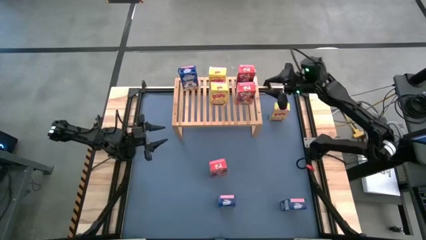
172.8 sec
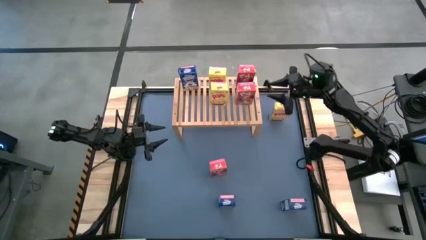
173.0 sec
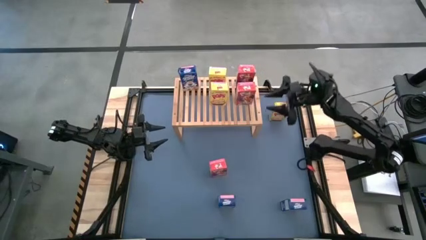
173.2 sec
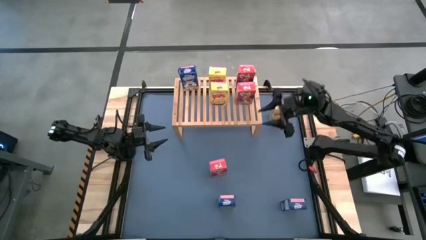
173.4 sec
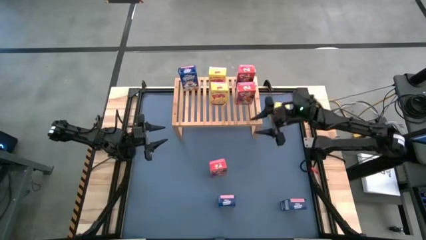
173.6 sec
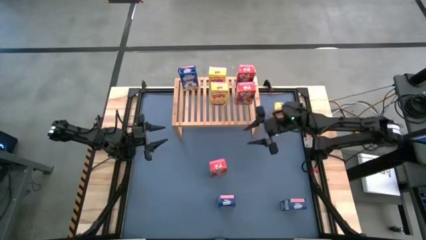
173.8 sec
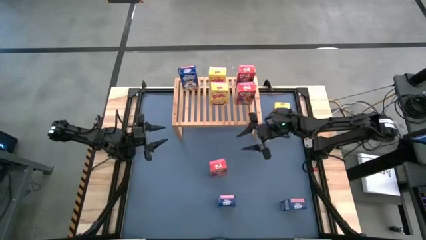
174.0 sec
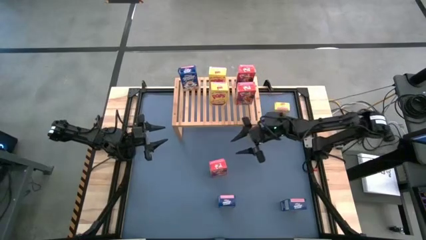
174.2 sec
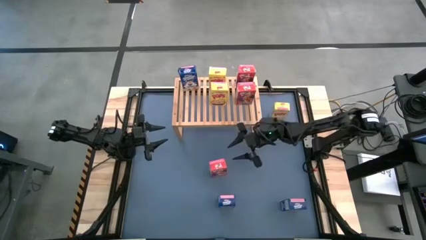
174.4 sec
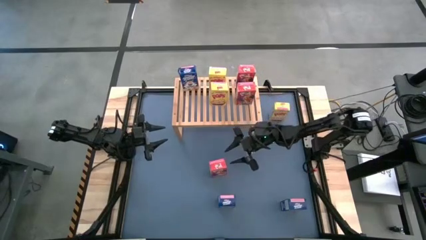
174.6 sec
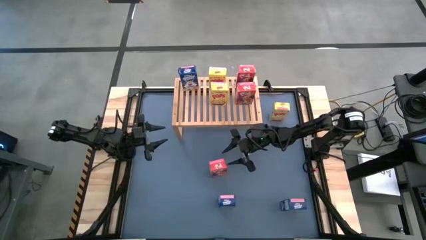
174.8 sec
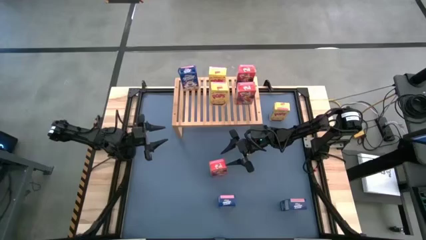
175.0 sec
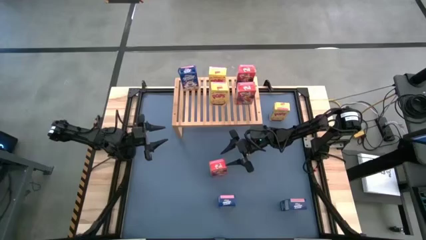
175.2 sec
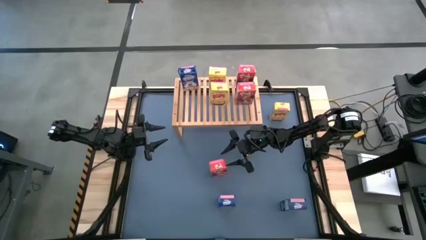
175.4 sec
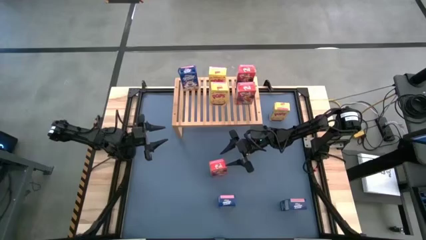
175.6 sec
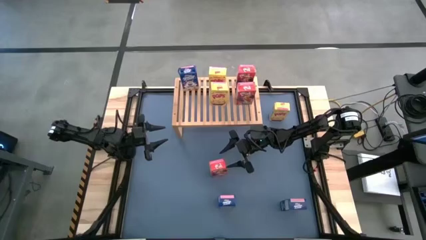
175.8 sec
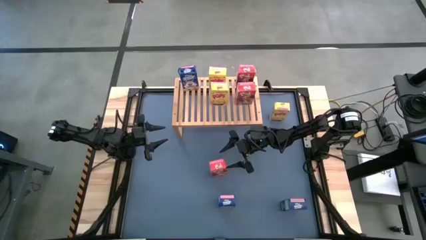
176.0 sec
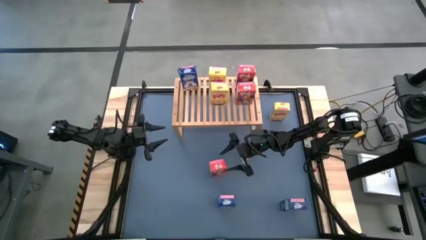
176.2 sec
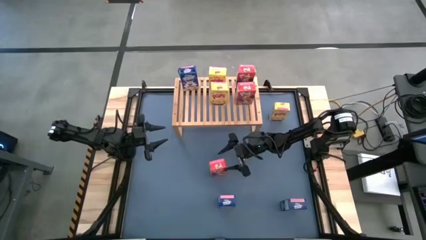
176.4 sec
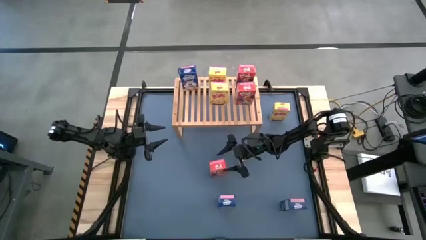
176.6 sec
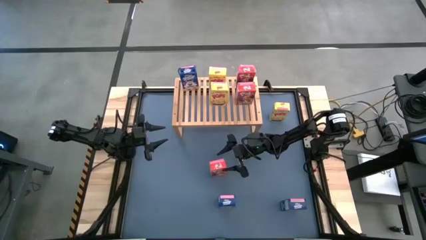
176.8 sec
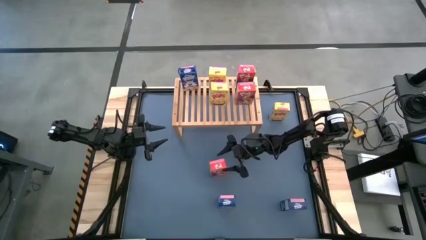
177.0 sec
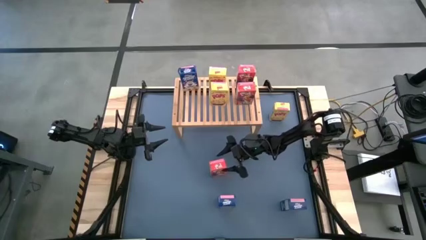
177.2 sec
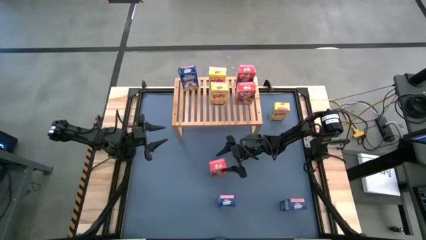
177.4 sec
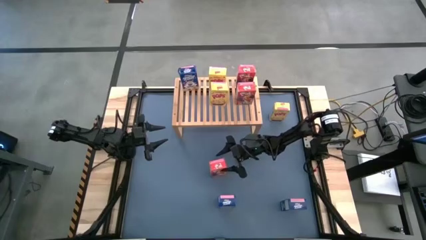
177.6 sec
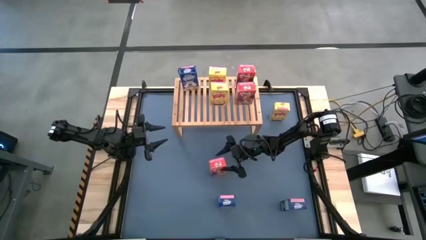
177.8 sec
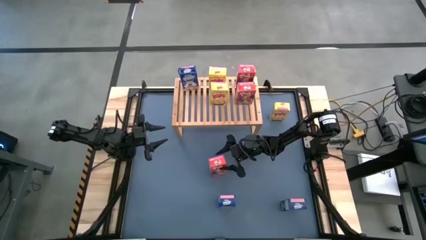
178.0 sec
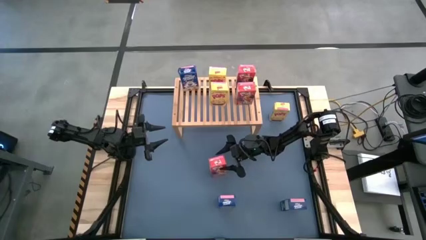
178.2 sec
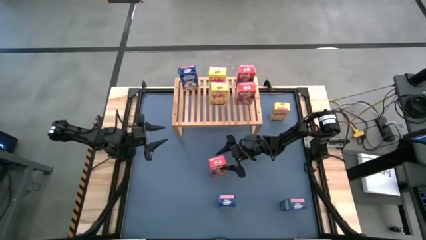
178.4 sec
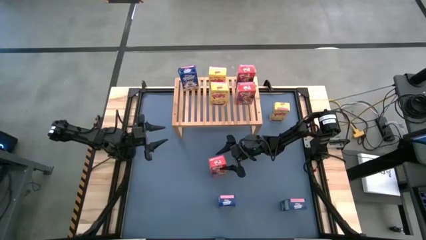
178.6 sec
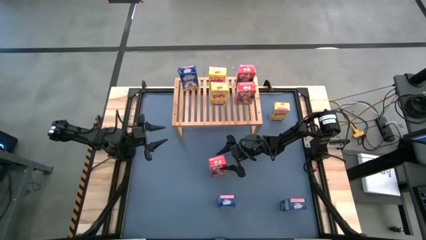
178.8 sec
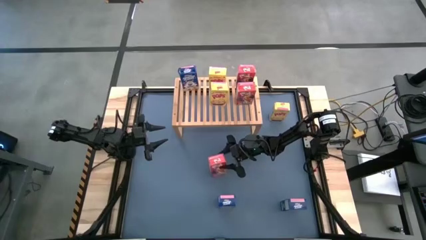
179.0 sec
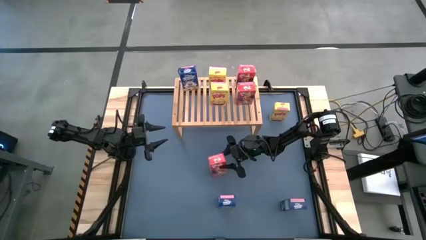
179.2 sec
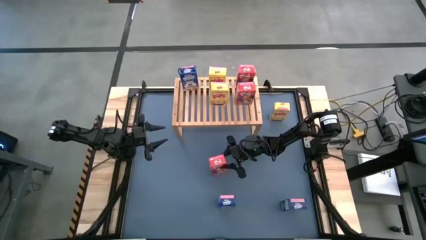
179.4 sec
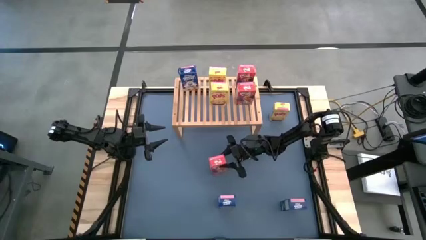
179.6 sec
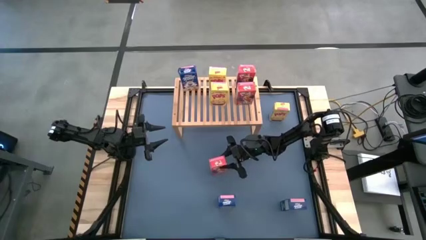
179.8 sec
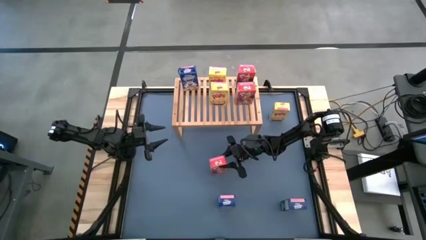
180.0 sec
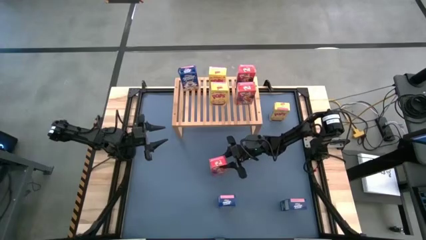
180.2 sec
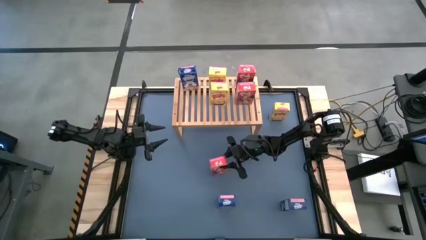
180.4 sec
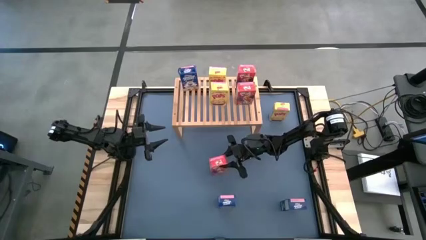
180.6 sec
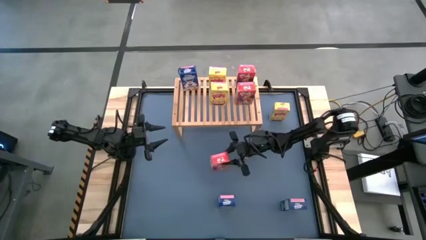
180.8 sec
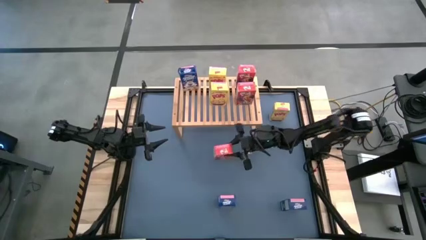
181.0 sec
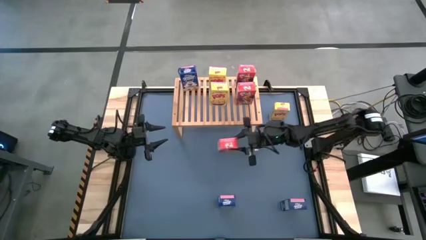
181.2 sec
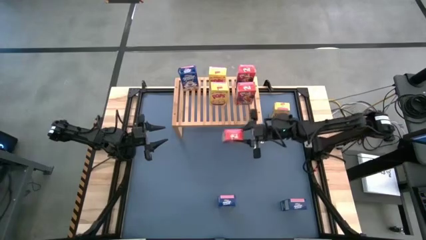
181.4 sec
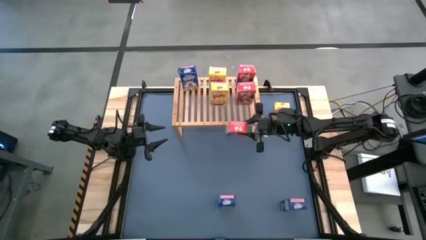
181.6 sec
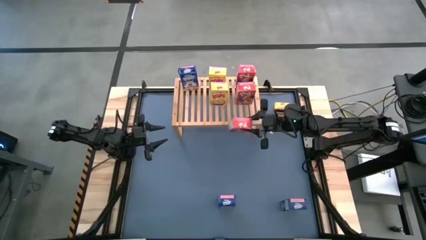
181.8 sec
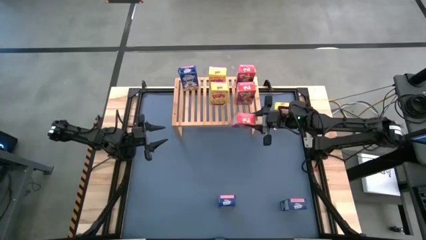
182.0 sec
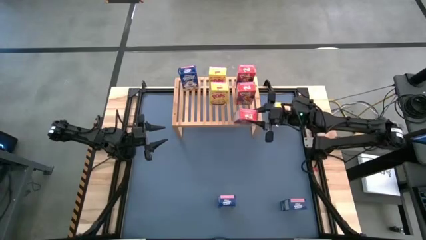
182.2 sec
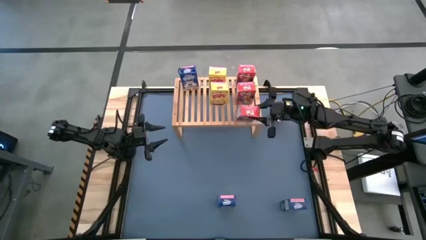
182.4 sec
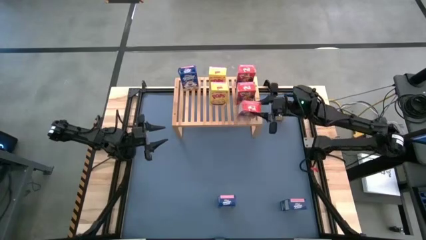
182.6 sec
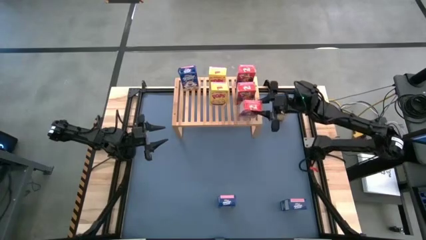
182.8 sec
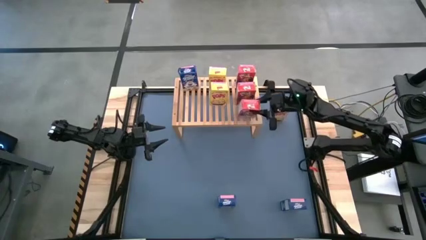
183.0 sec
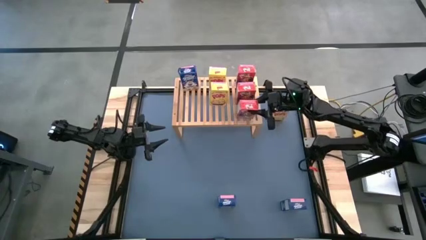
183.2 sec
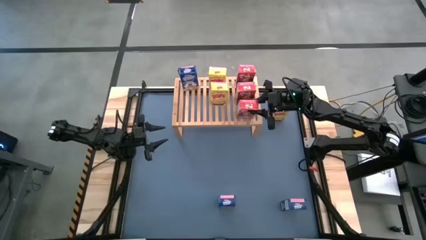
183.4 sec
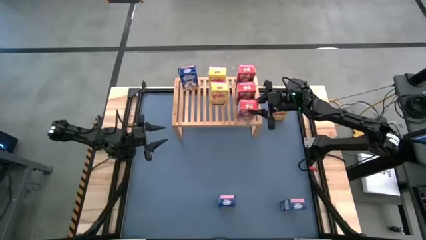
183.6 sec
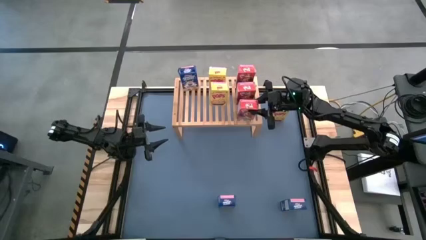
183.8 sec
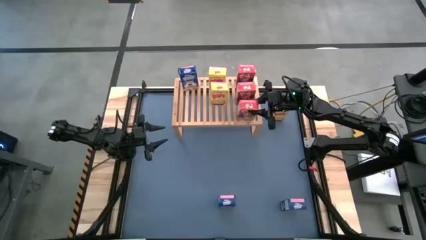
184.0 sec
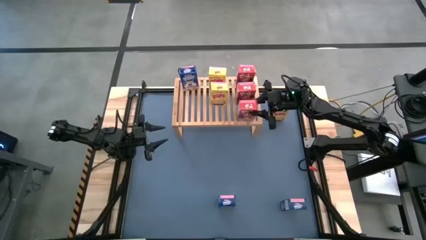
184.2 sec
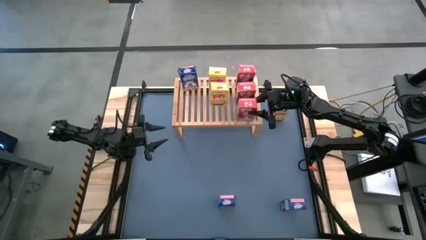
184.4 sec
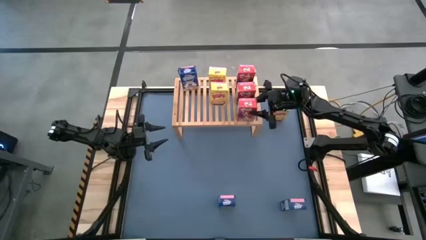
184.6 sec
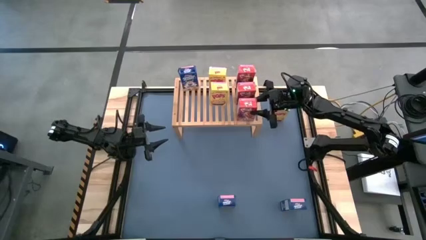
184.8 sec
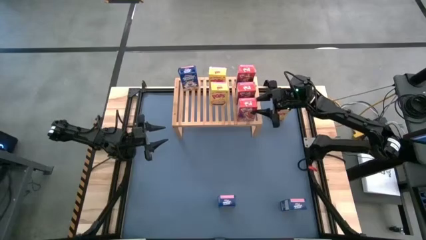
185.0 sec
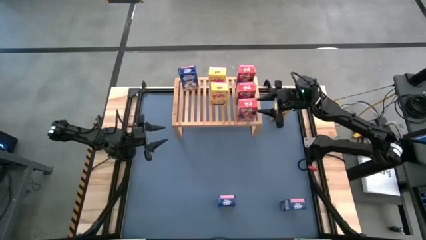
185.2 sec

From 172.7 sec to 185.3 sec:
Task: Stack cereal on shelf
Put the red cereal box on the shelf aligned with the other red cereal boxes

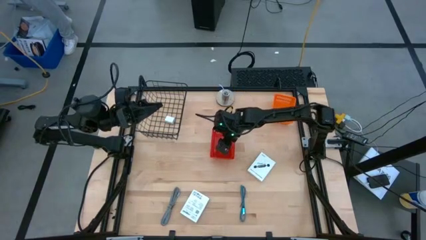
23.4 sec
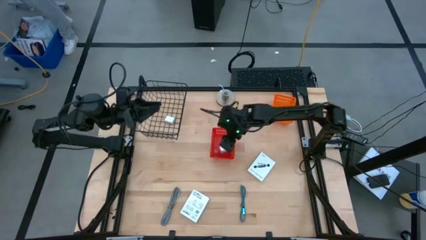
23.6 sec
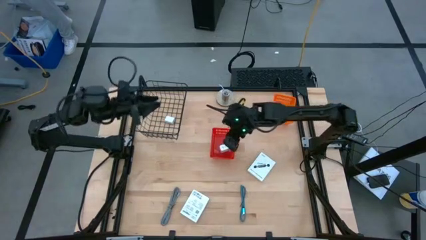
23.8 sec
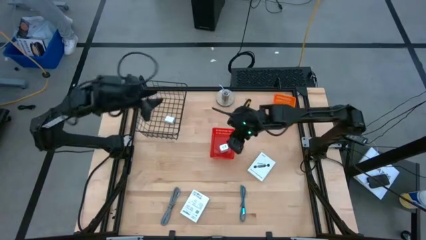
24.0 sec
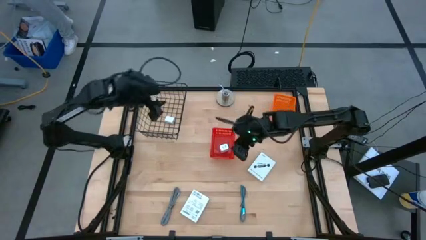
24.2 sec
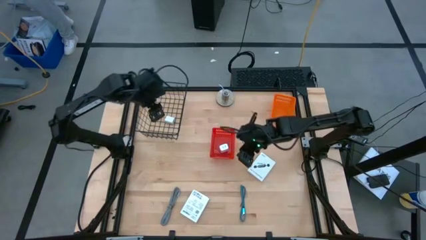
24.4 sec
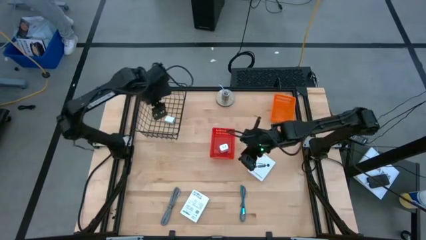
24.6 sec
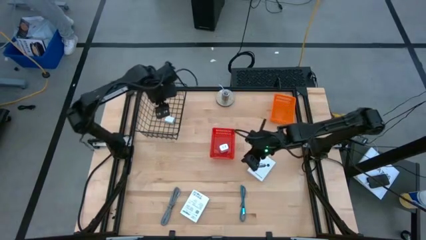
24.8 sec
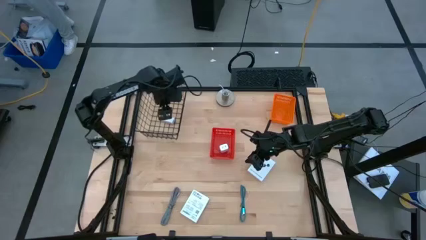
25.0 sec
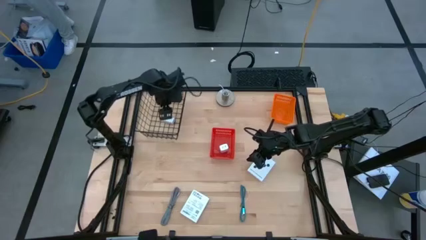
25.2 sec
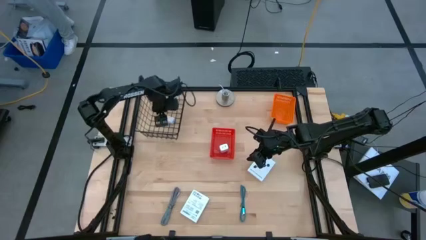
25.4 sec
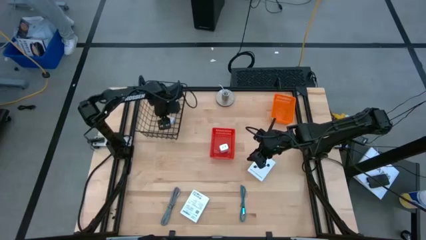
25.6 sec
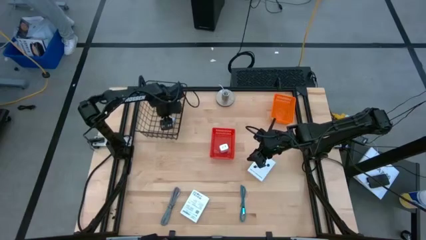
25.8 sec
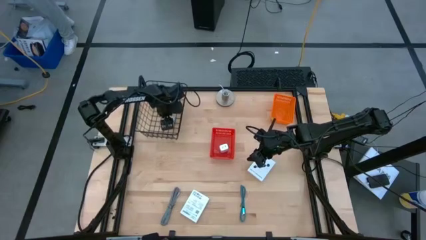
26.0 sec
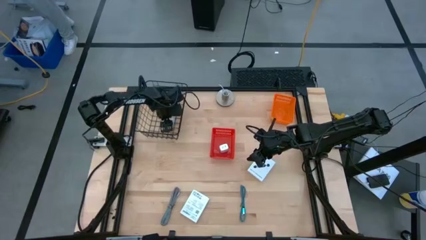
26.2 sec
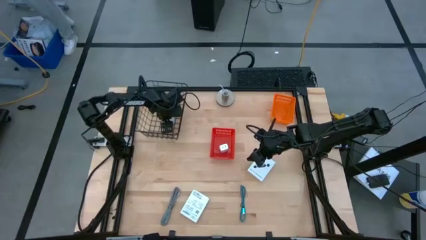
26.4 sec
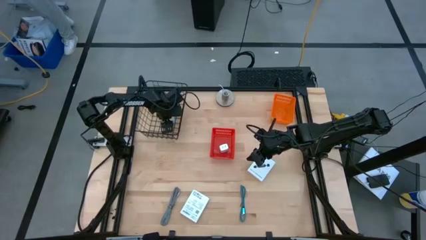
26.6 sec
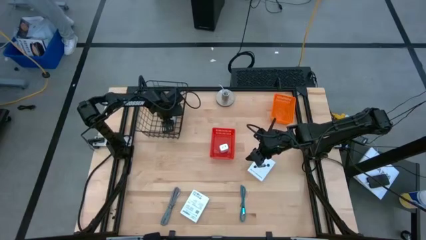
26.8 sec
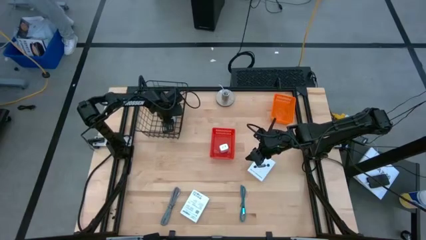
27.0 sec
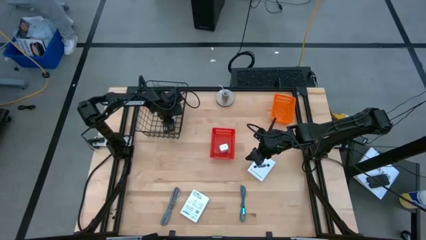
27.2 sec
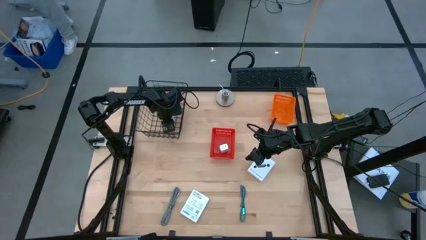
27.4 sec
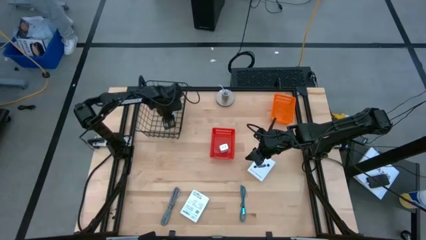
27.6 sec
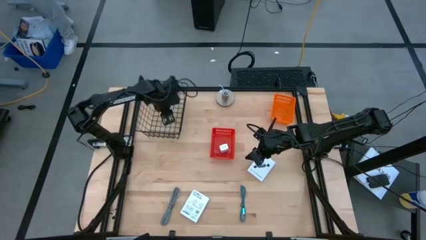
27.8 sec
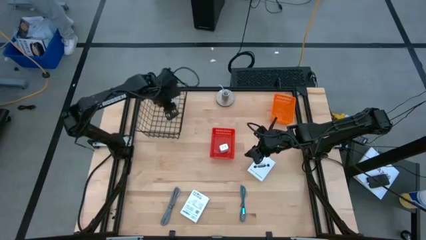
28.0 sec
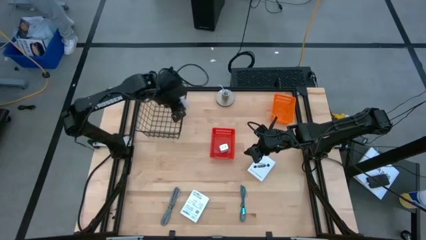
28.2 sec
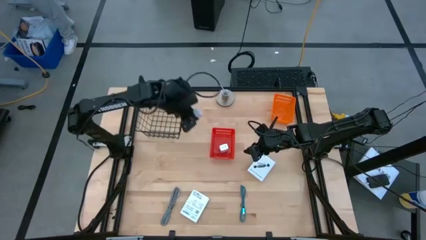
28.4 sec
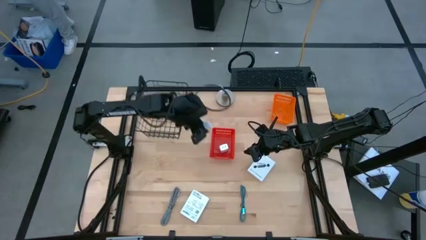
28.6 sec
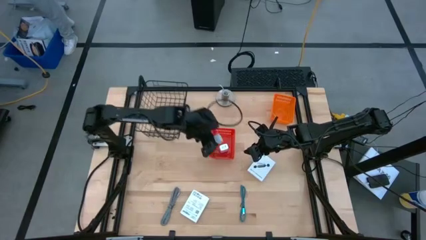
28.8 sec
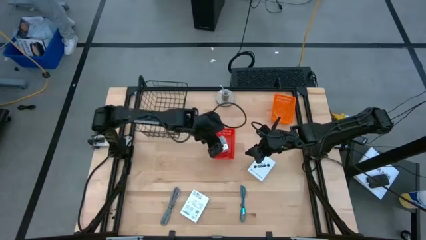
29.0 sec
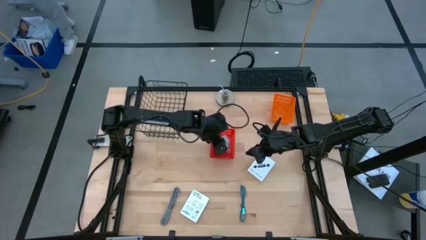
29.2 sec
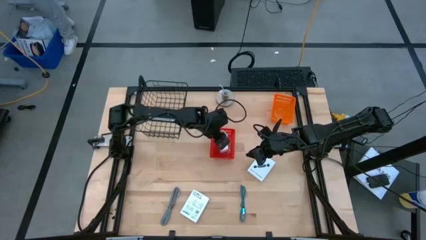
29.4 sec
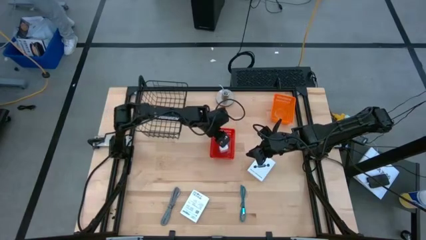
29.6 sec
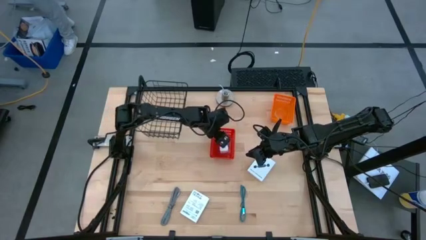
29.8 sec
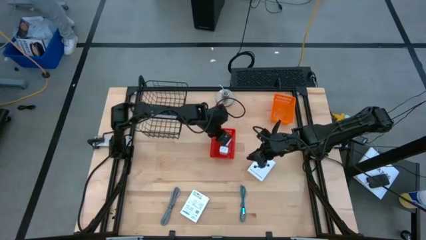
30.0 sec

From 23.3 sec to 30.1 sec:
Task: Pick and place items into bin
Put the white charger adapter into the red bin
